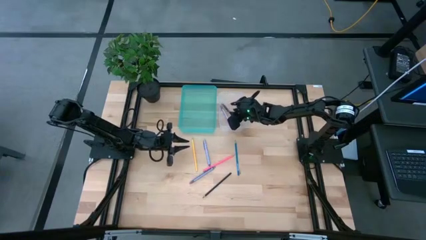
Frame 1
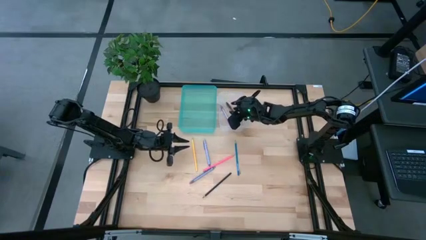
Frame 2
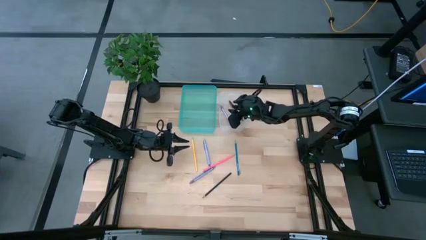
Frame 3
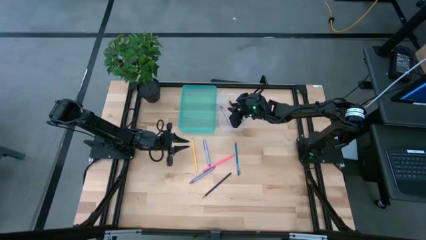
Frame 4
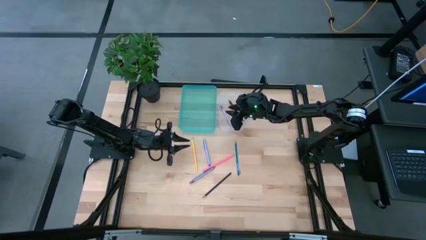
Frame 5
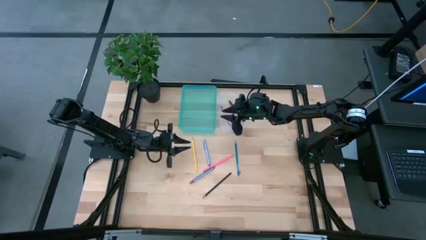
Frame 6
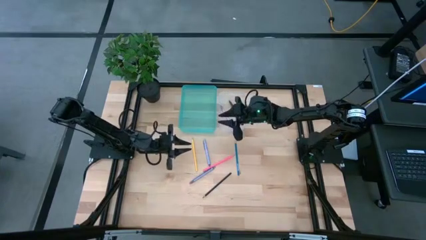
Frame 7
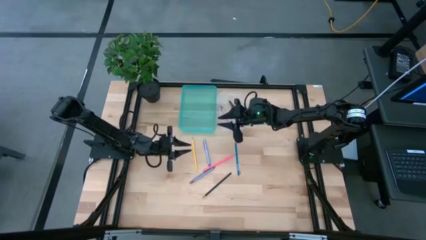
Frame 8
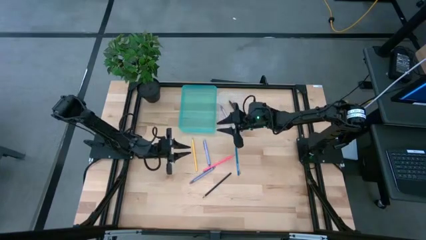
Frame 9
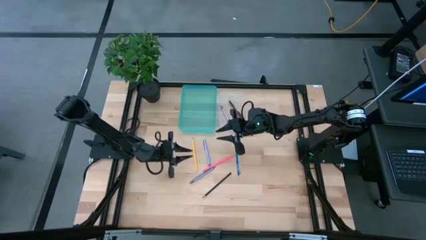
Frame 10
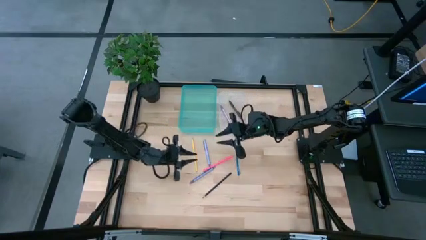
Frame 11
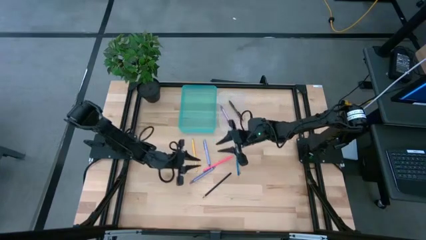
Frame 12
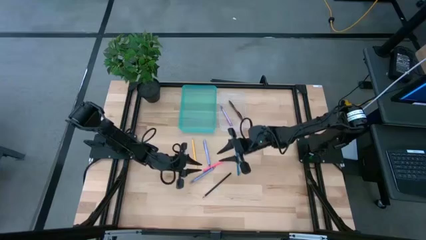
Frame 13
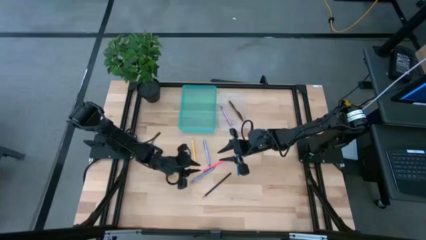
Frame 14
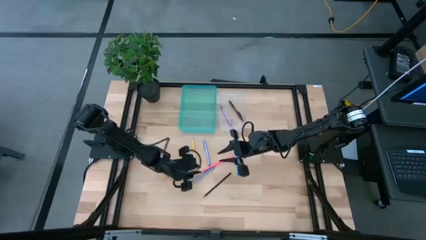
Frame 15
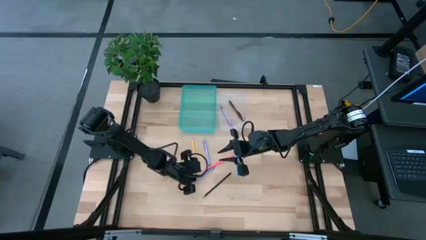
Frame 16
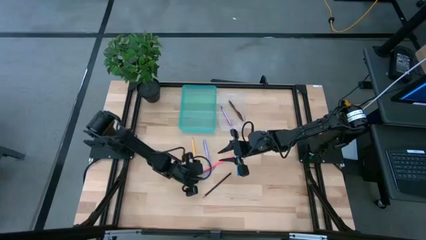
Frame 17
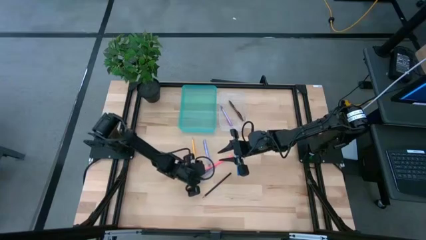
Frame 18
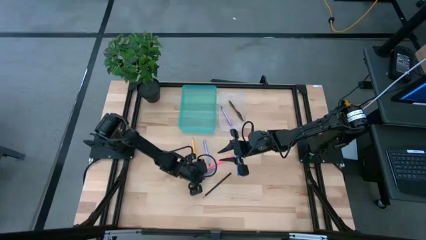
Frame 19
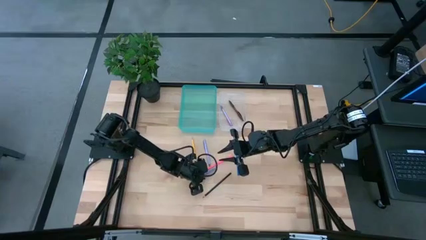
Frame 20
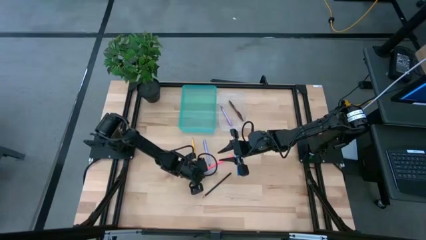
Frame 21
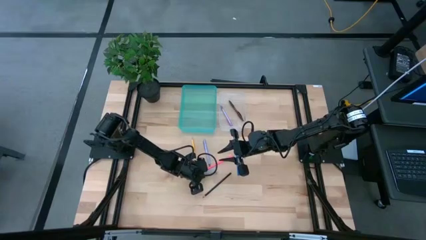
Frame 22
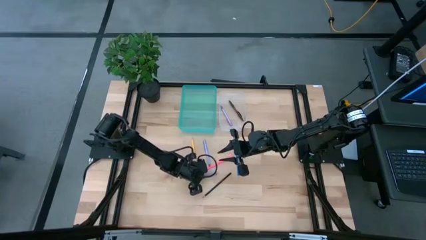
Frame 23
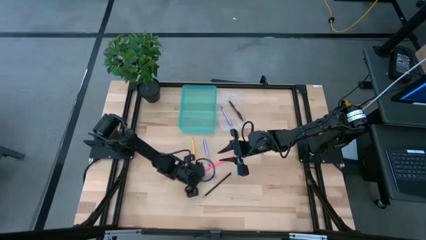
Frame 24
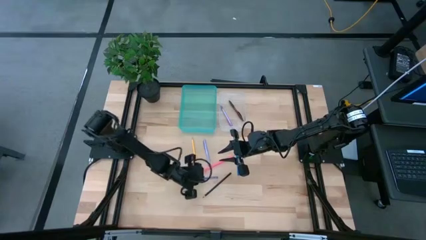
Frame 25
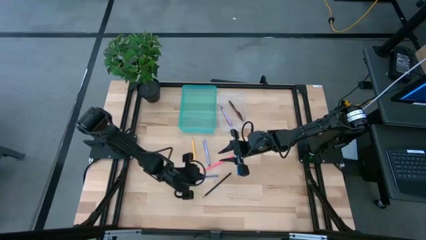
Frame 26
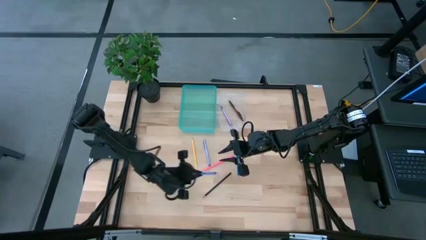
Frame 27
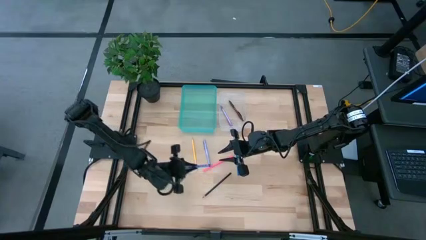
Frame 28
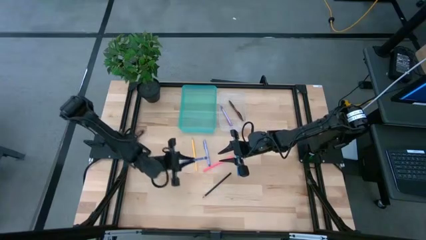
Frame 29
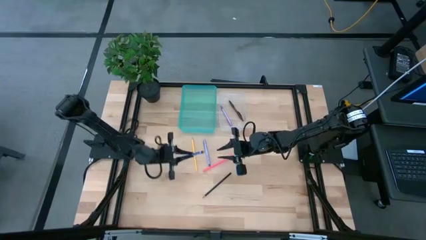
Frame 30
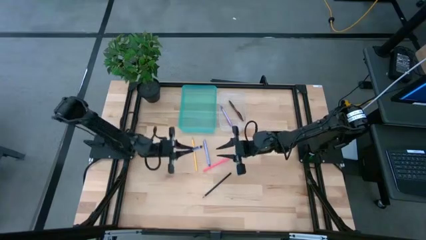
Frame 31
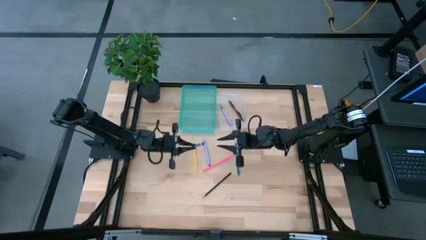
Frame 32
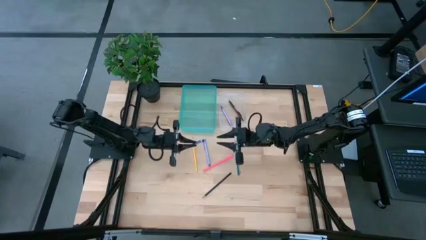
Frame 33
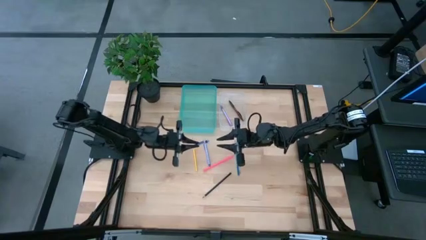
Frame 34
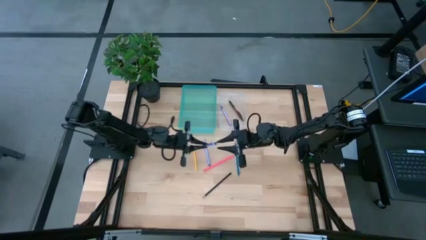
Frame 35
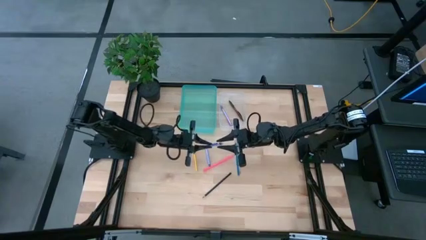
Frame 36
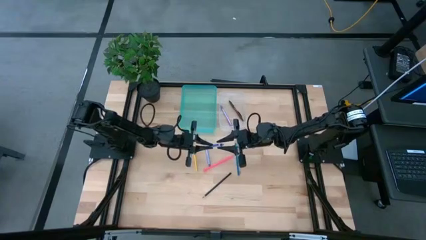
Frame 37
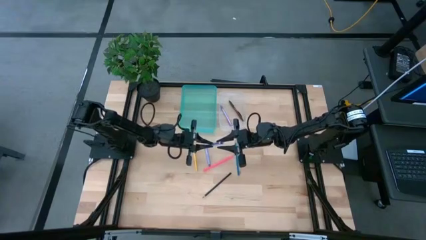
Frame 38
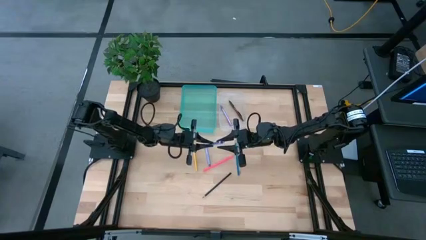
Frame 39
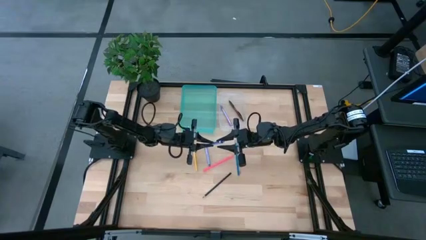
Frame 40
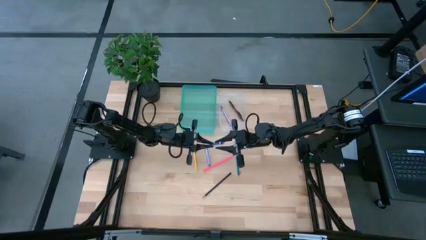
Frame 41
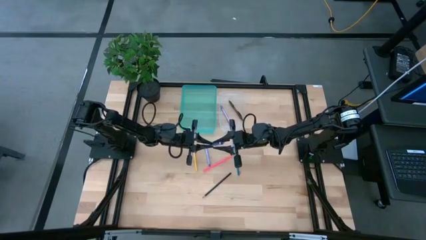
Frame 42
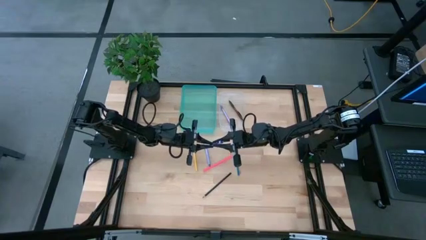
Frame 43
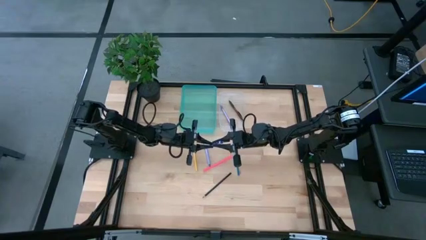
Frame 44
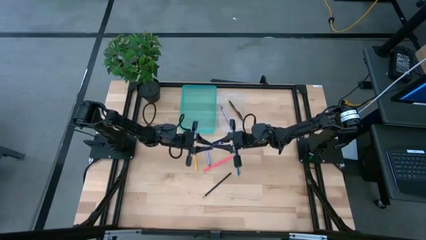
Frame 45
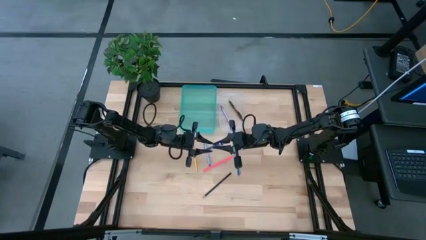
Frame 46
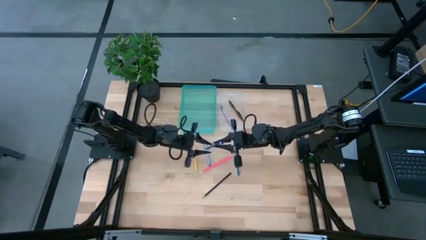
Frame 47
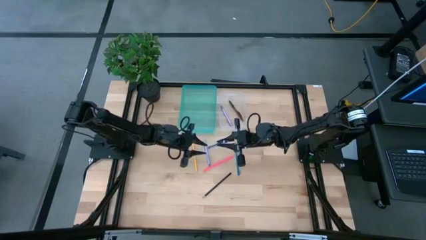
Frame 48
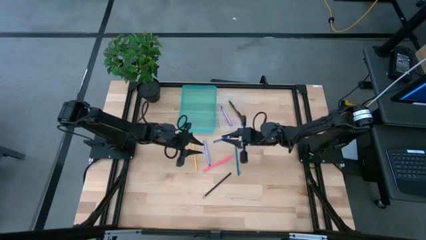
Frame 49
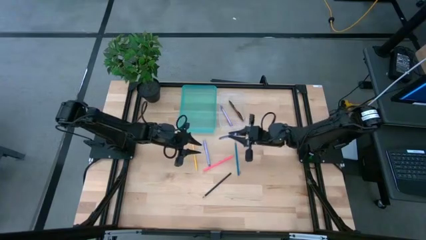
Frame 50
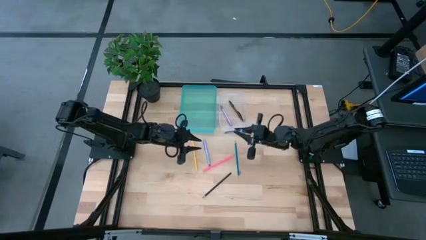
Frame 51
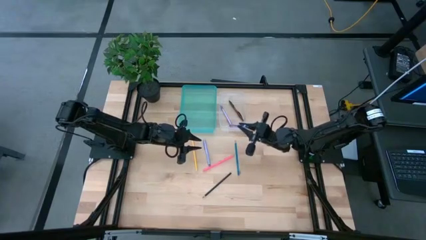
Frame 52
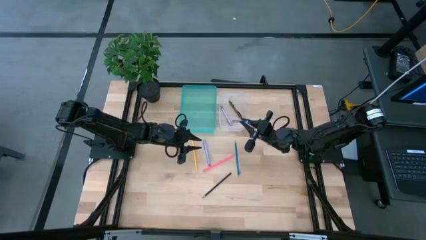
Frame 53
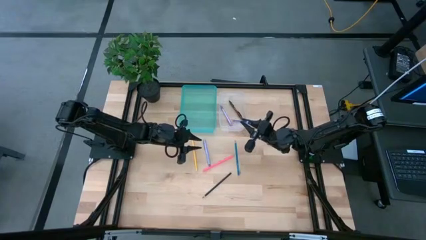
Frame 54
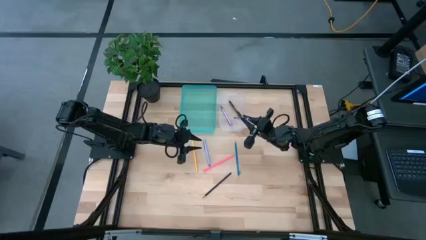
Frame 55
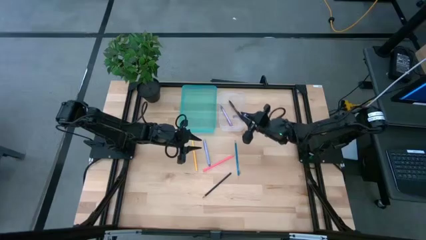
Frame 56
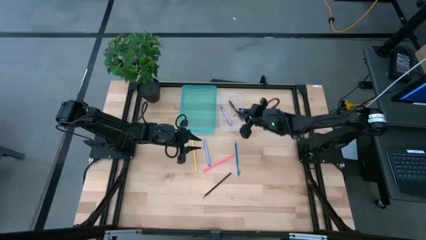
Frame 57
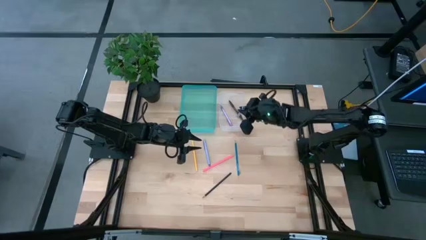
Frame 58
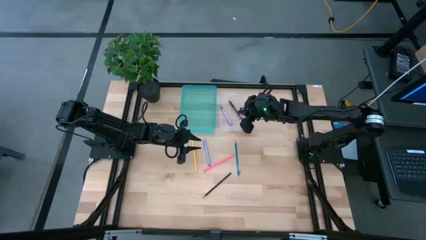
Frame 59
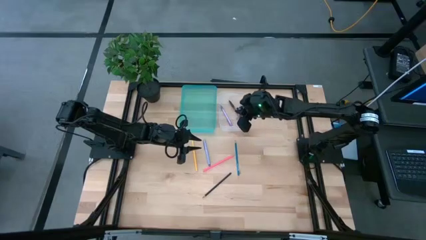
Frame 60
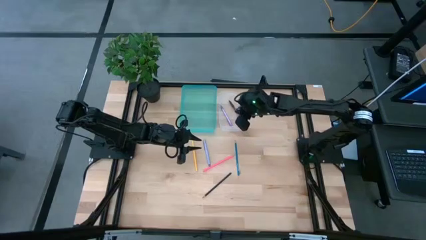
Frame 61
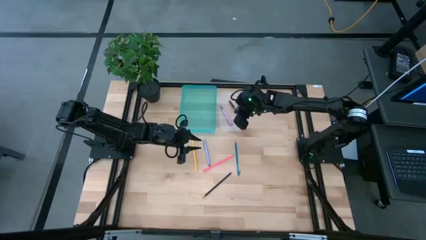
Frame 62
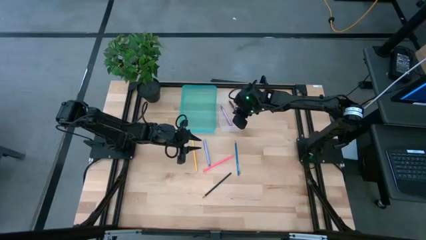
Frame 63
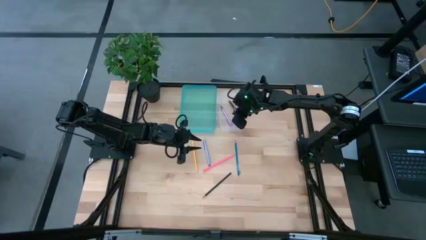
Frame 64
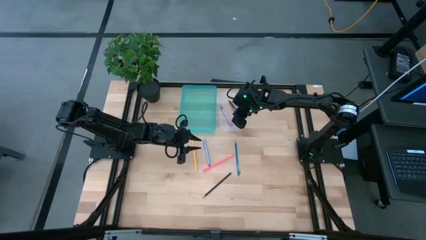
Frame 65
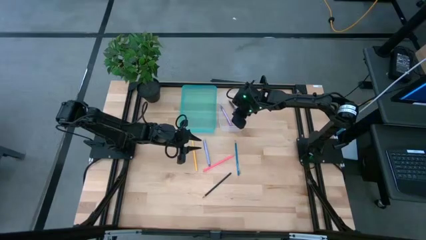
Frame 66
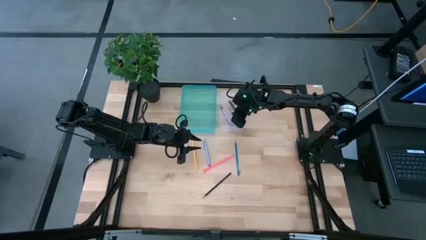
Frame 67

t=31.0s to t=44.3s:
Task: Sort pens & pencils
Put the blue pen into the transparent bin
